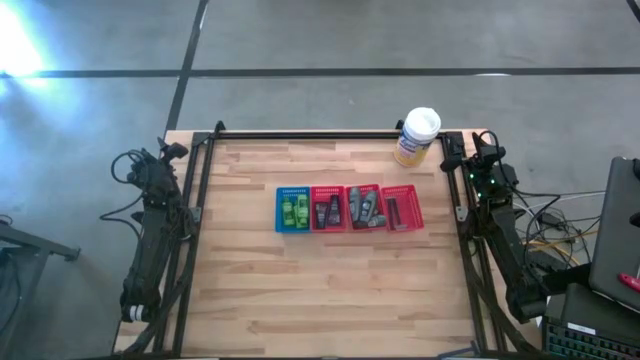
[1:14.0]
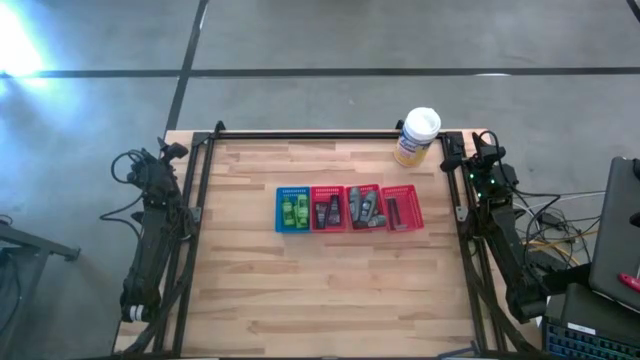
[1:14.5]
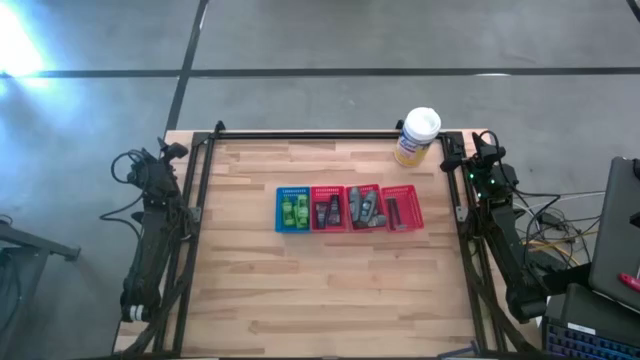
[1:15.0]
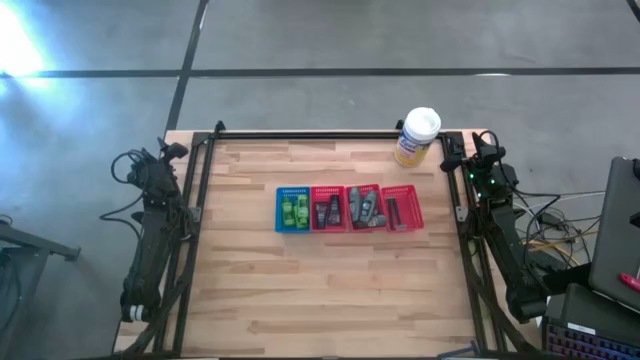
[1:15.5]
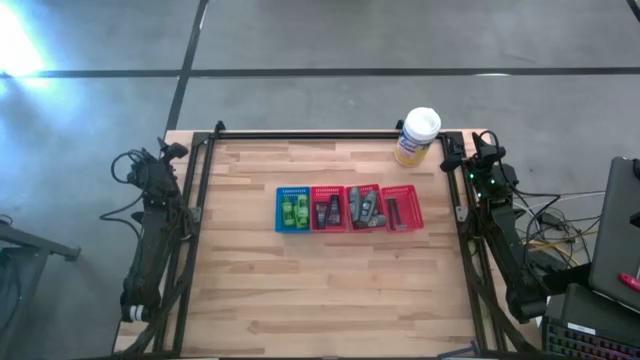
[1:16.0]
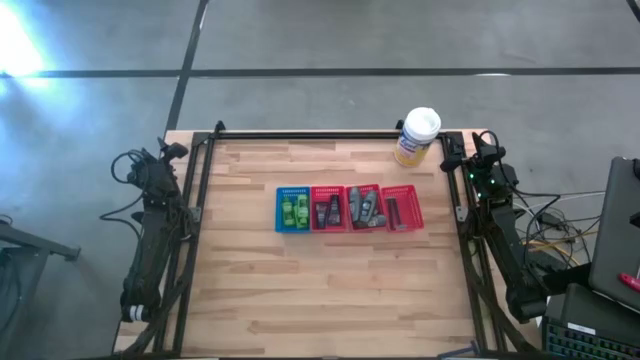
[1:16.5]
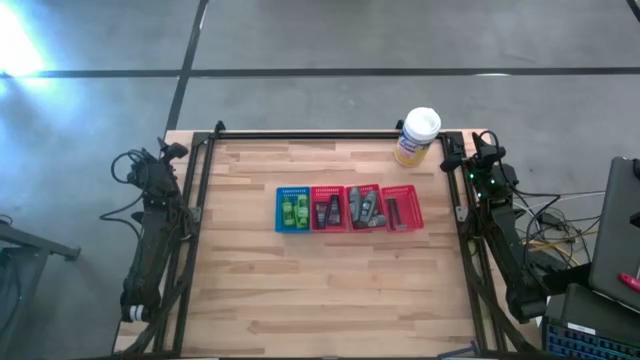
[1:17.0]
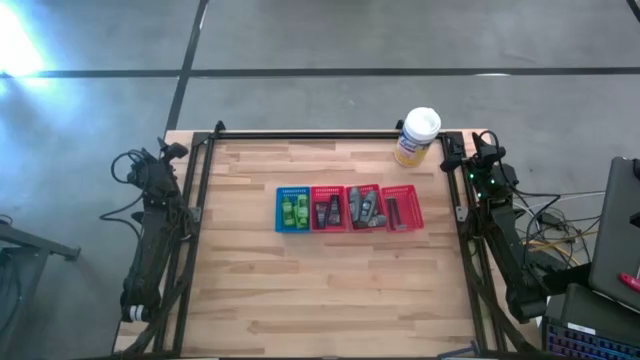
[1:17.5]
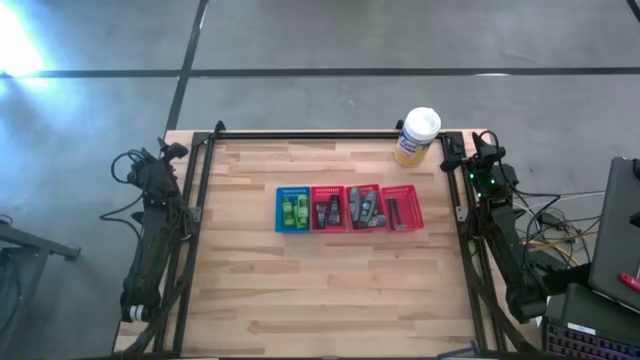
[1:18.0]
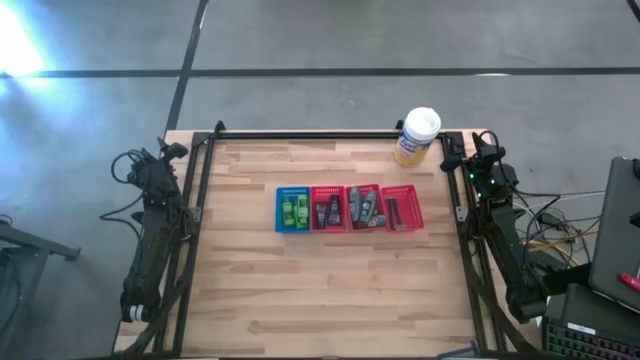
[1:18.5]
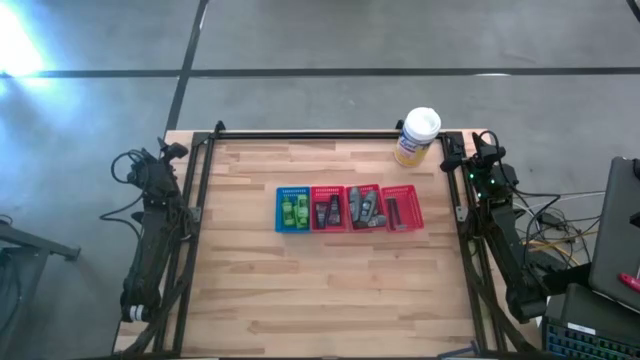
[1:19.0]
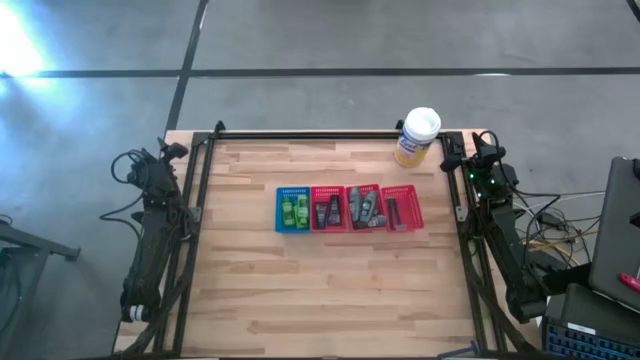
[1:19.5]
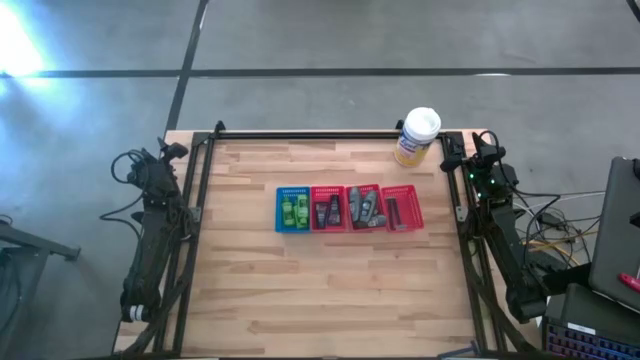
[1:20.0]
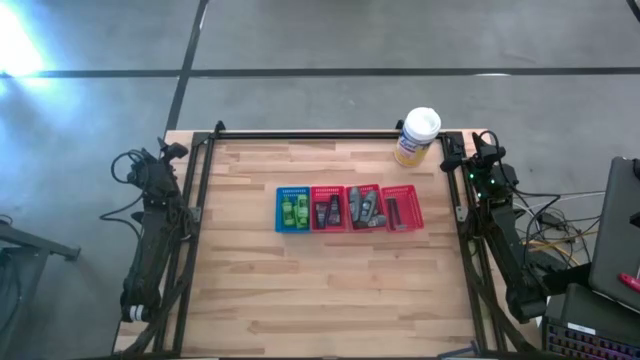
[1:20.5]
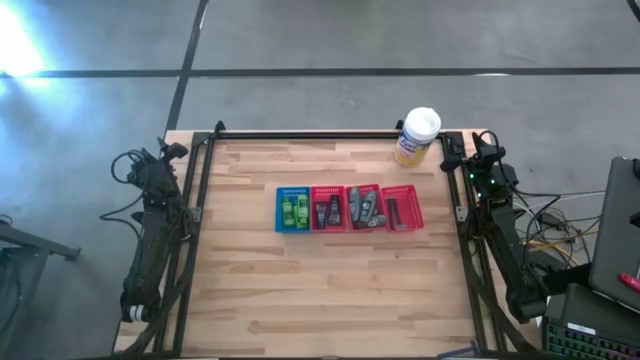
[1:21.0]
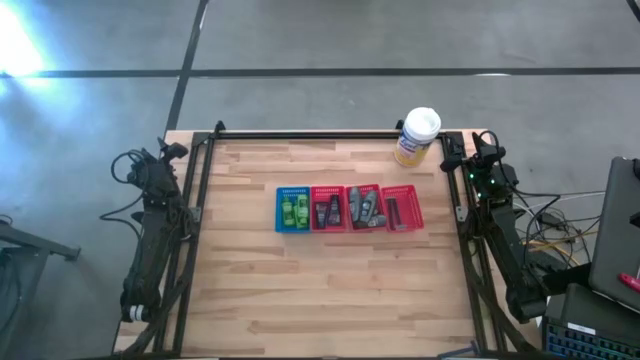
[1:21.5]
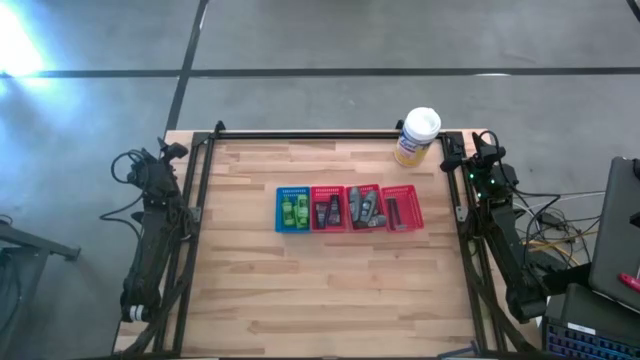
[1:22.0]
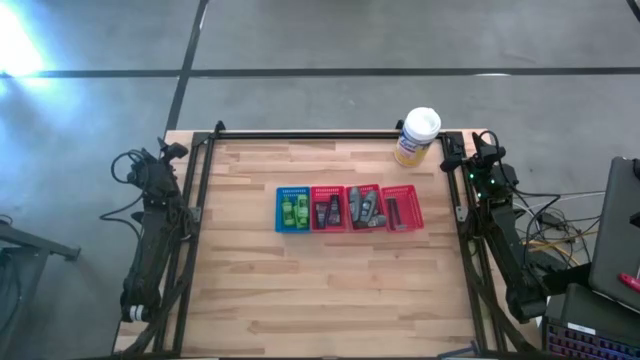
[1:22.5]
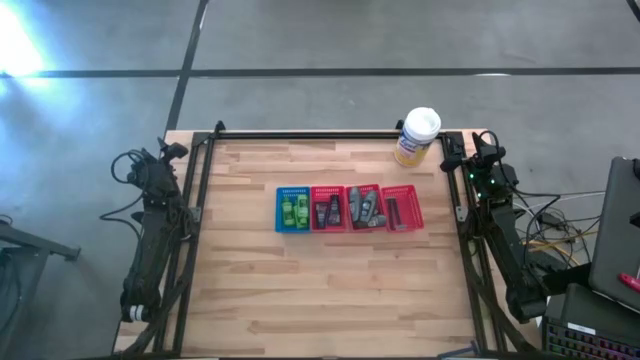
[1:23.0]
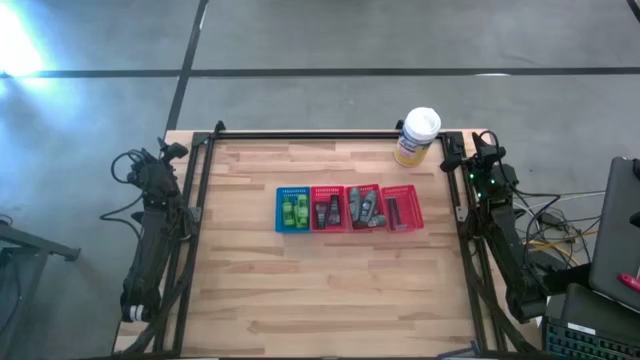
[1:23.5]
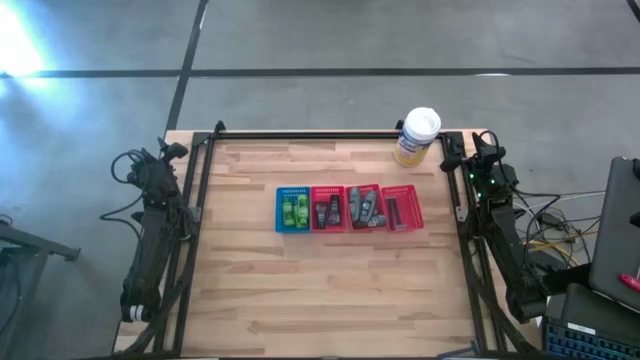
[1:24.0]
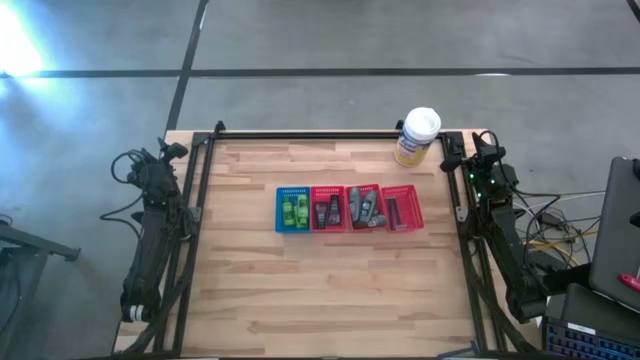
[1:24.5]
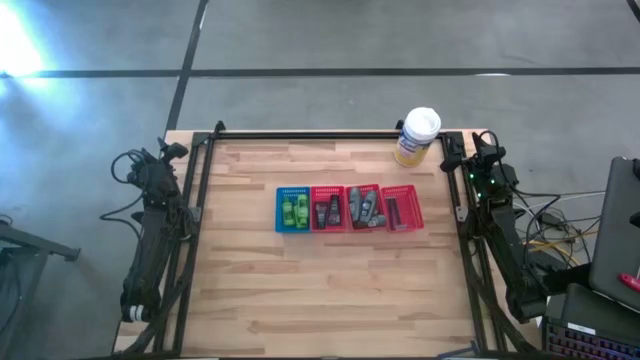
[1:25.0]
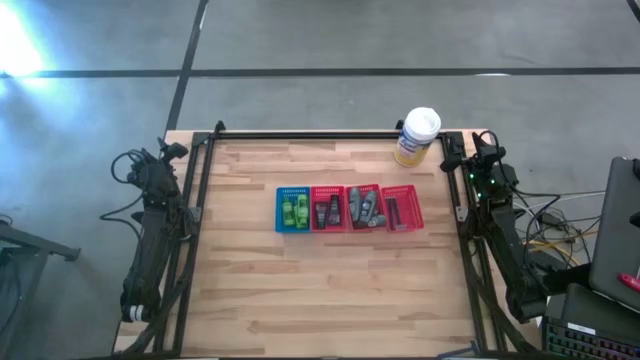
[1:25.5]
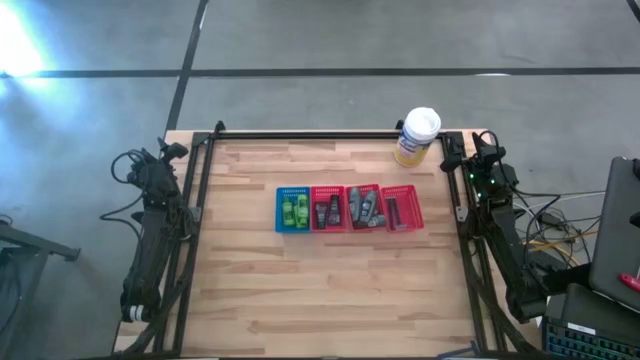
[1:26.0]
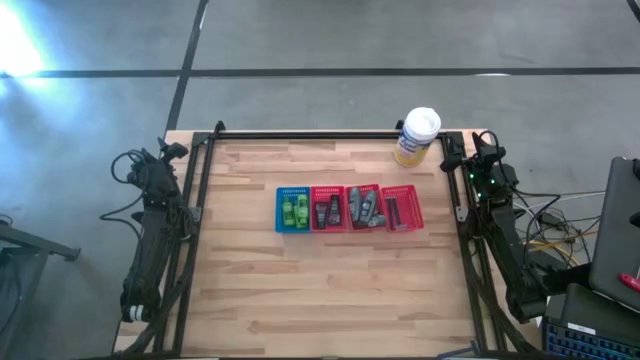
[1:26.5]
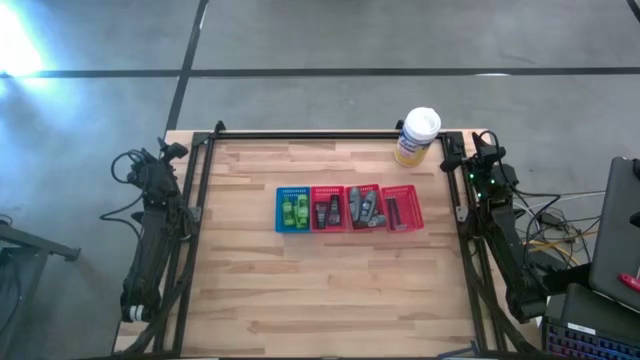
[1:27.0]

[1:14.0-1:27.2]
Task: Pick & Place Travel size toiletries
Return to Home Position

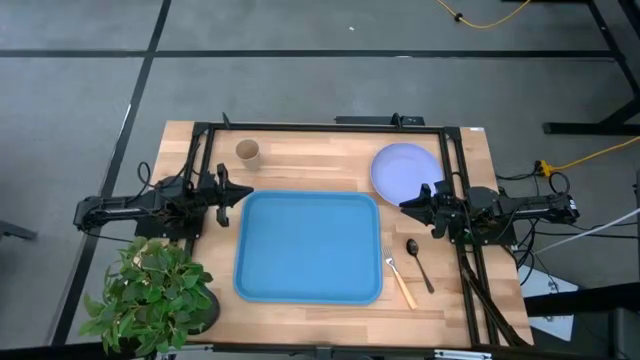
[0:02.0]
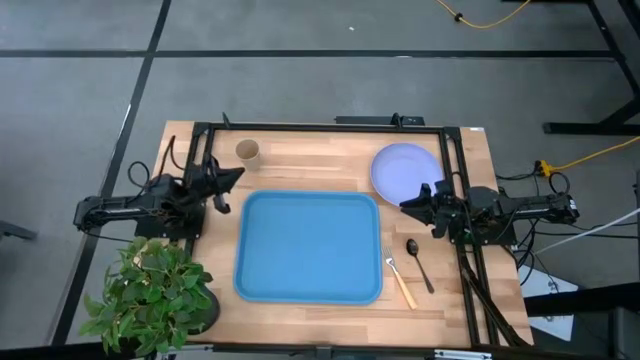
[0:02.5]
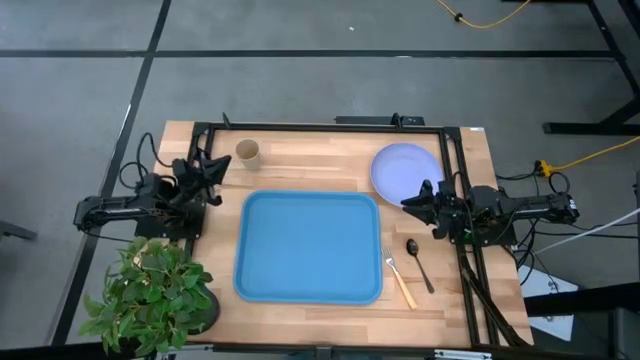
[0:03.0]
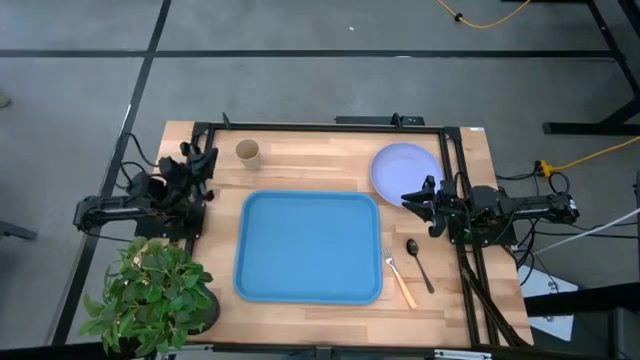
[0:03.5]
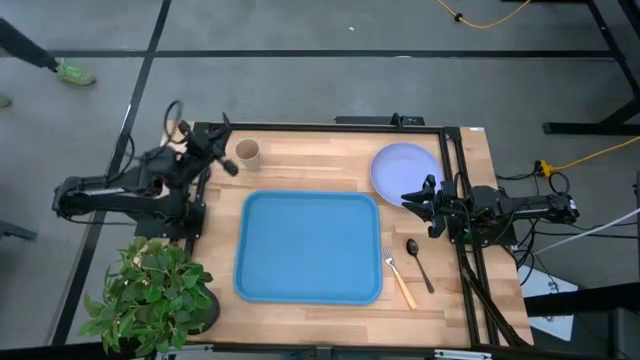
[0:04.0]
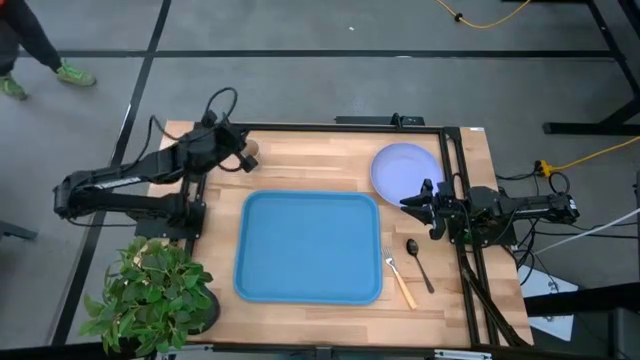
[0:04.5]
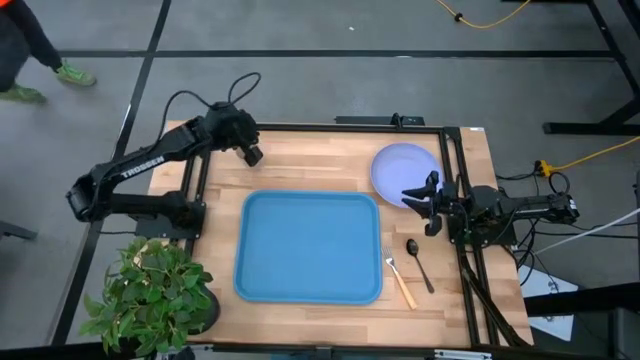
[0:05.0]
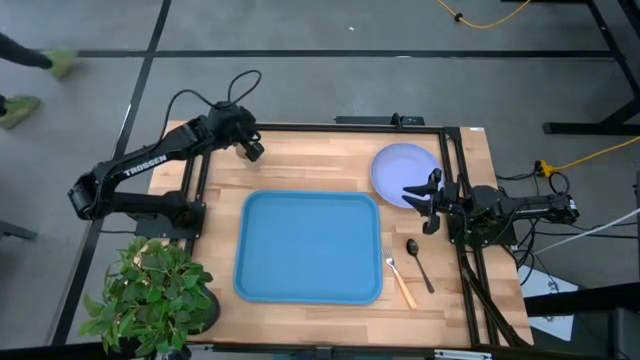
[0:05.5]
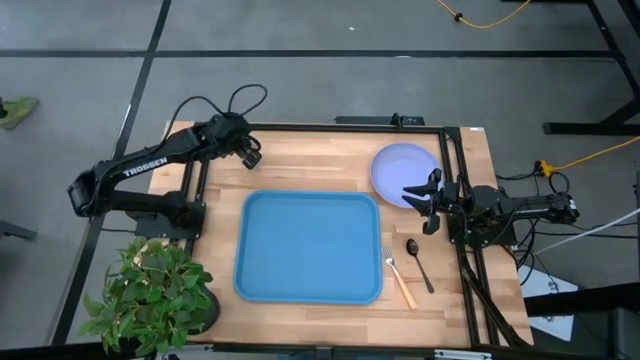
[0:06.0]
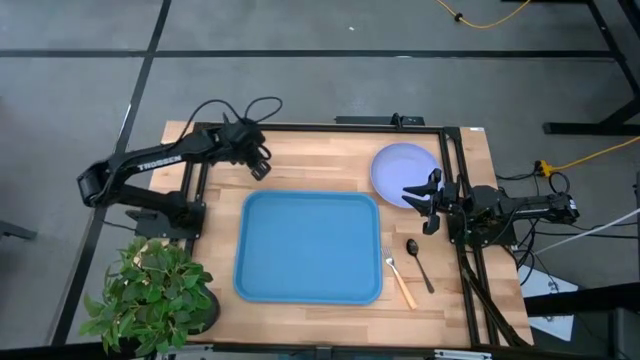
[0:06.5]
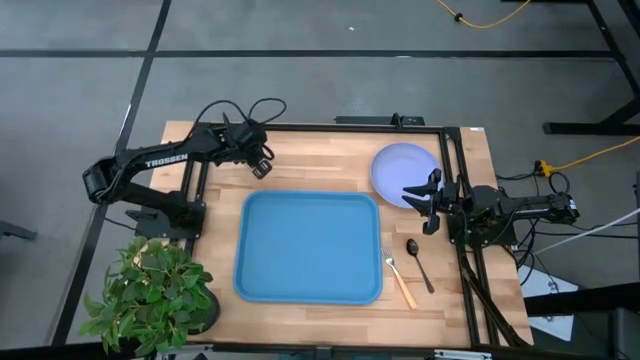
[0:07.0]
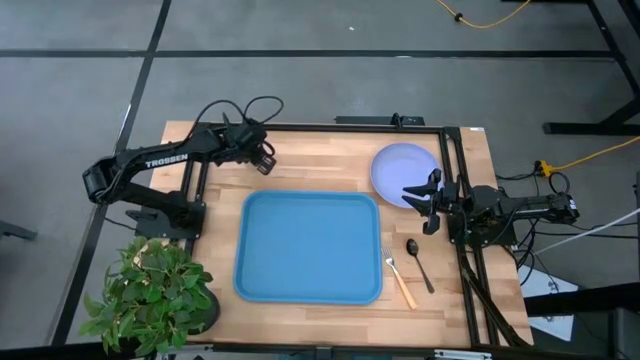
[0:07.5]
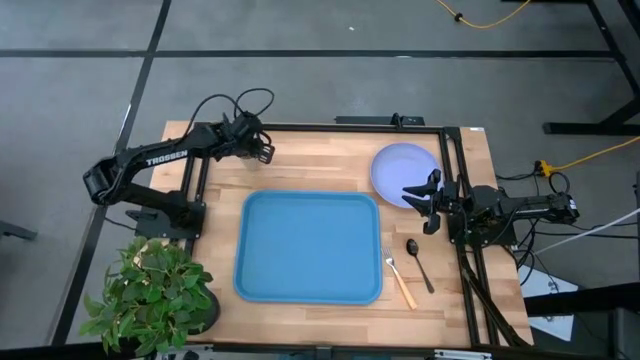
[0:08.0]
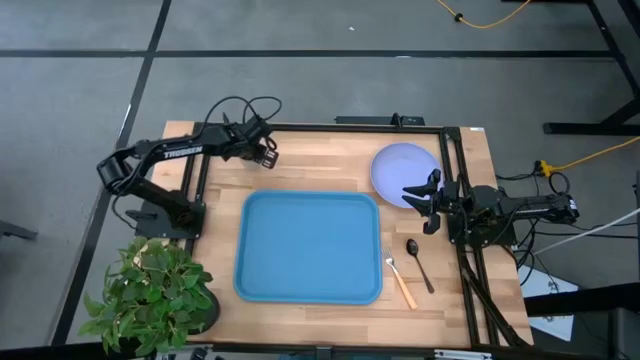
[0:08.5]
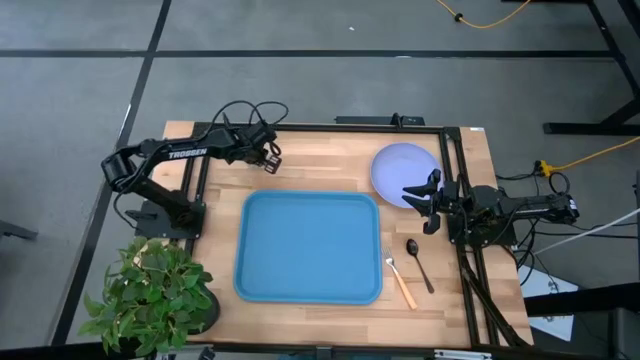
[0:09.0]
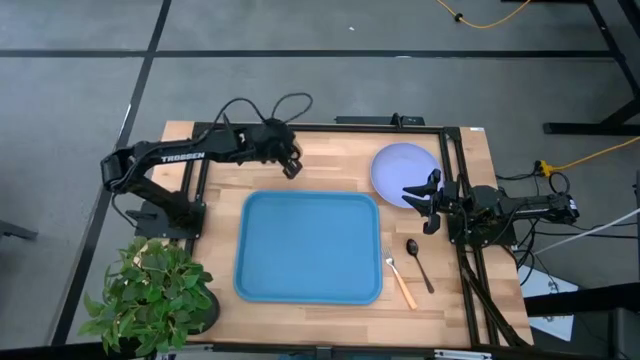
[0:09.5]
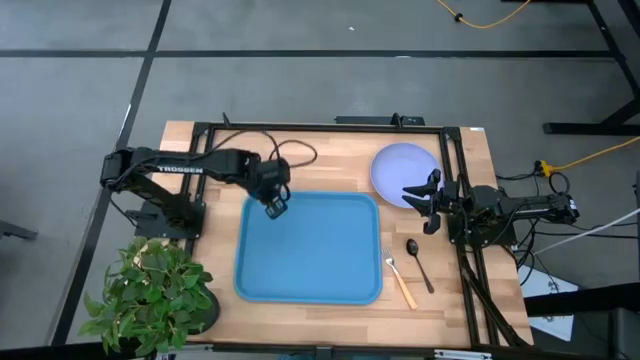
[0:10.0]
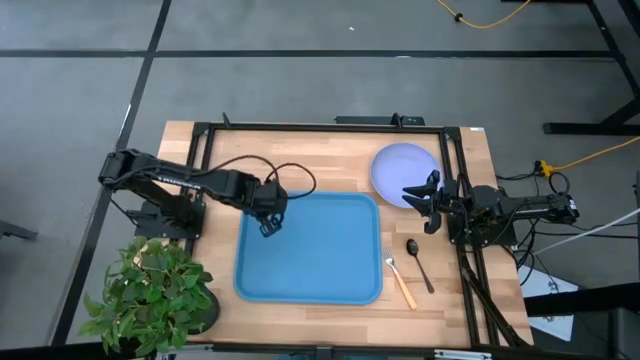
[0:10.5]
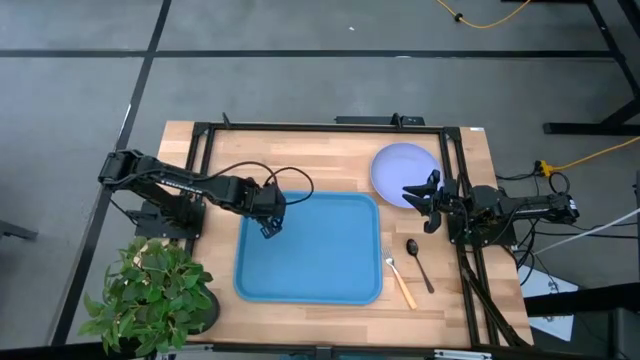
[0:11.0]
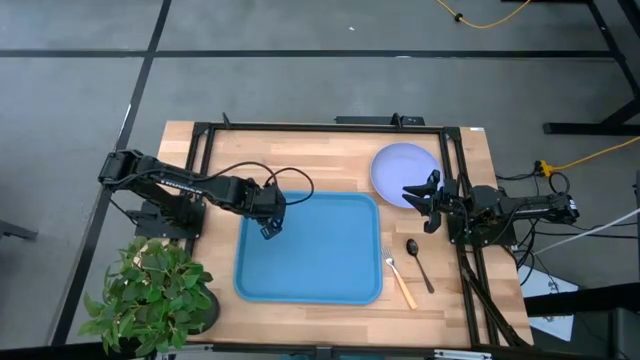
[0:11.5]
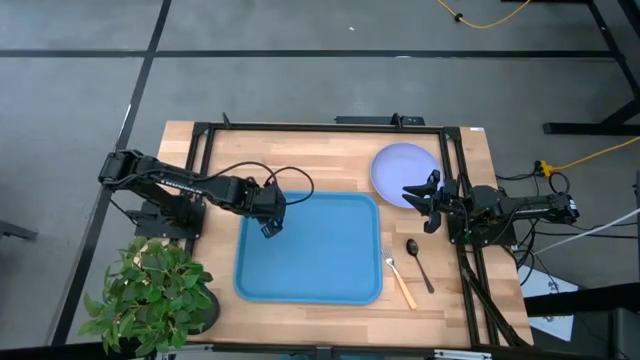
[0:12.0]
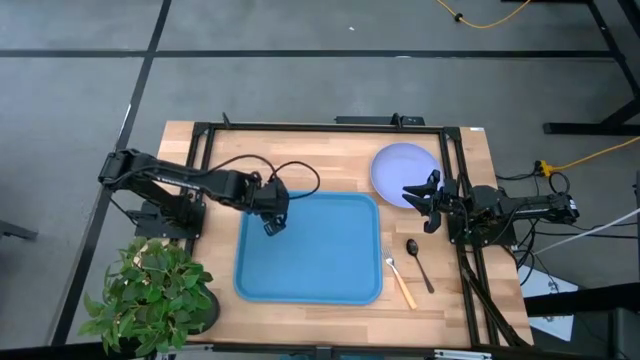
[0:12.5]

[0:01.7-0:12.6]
Task: Pick and place plate/cup/fork/spoon on tray
Put the brown cup on the blue tray
